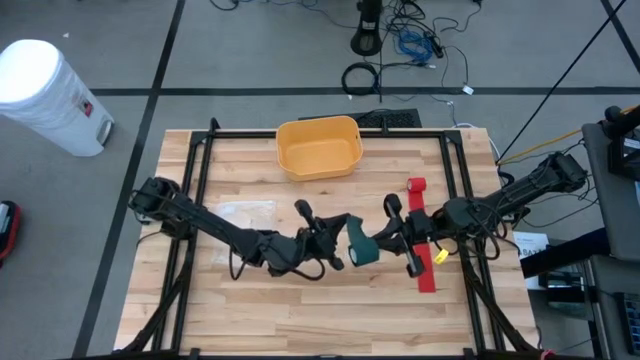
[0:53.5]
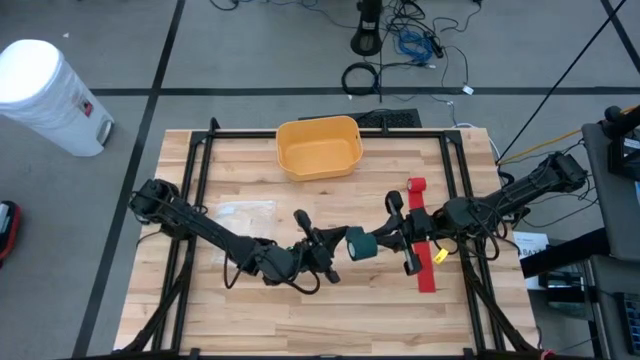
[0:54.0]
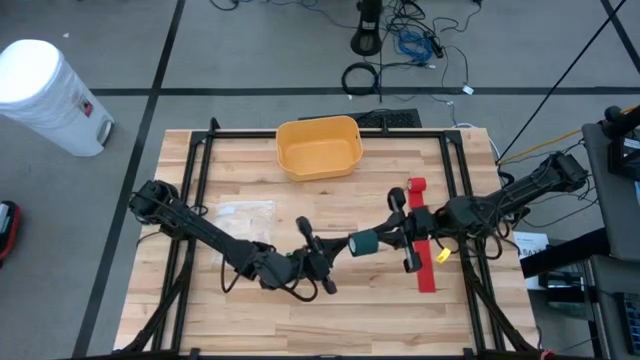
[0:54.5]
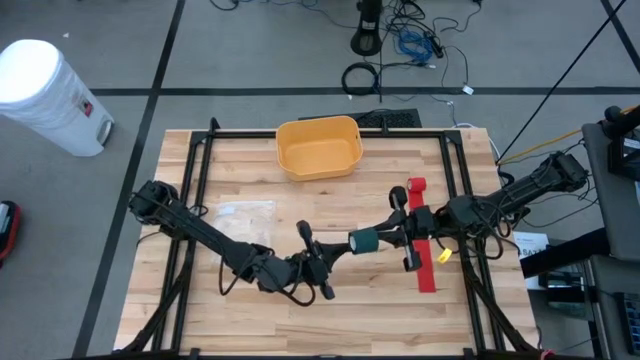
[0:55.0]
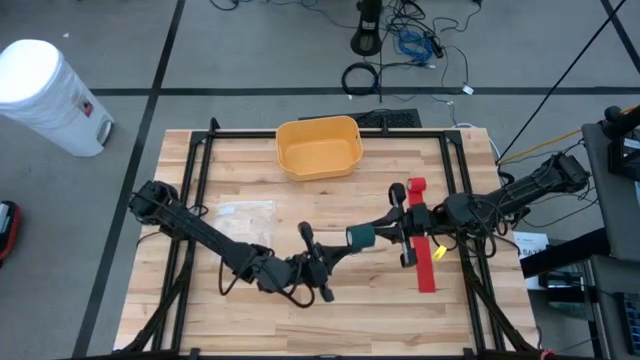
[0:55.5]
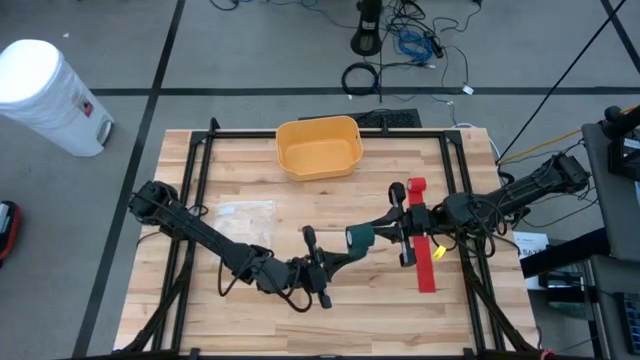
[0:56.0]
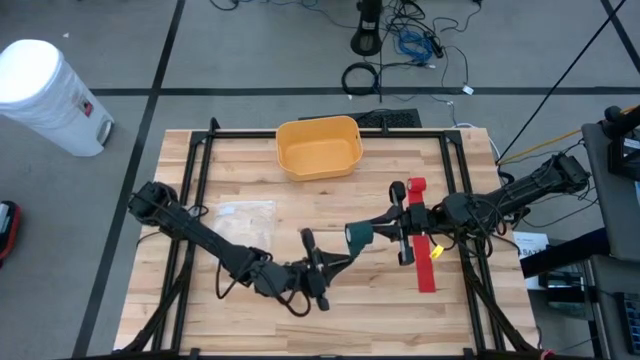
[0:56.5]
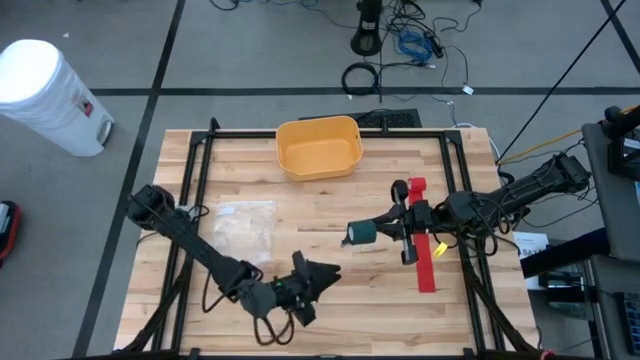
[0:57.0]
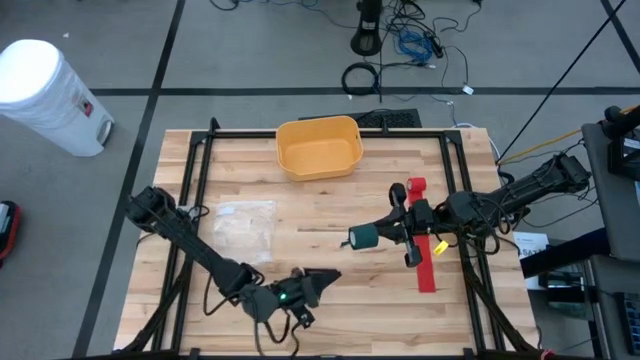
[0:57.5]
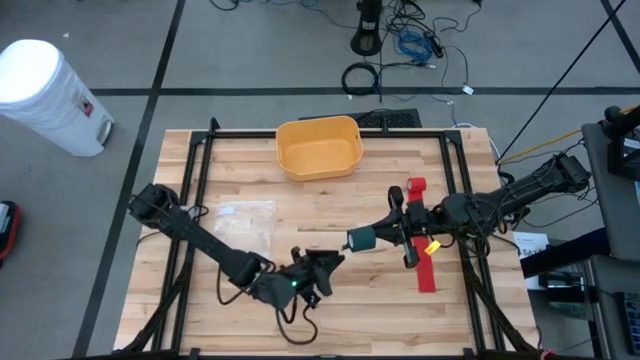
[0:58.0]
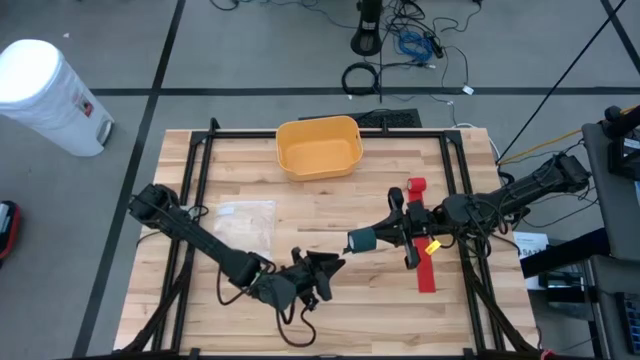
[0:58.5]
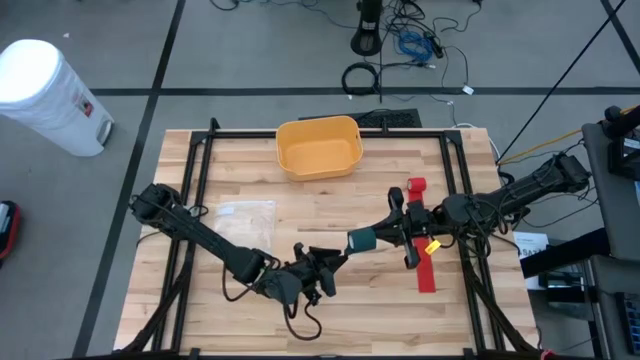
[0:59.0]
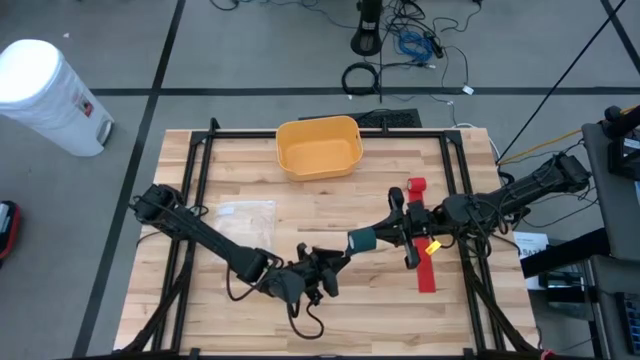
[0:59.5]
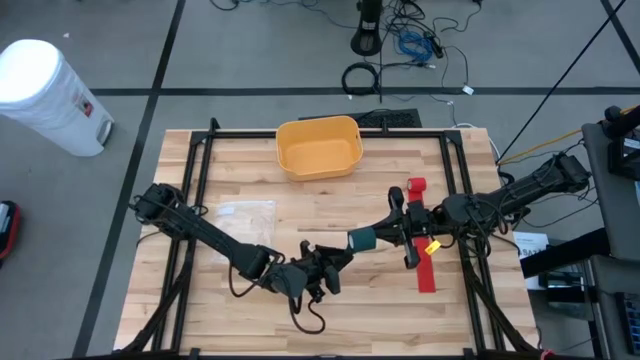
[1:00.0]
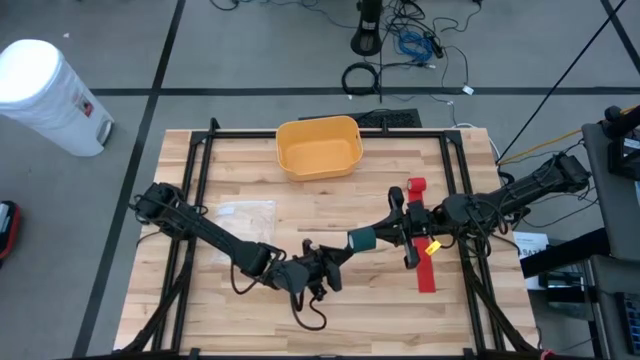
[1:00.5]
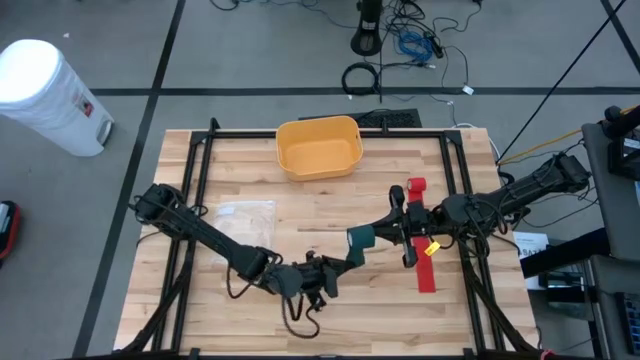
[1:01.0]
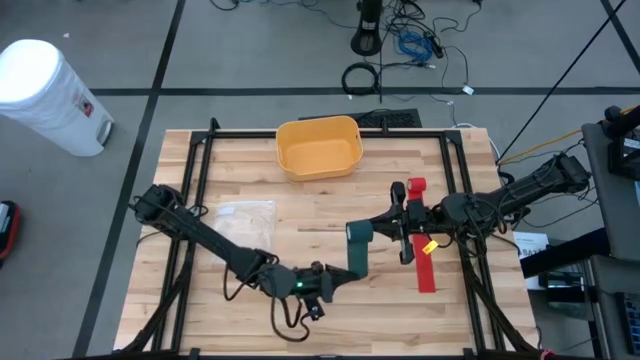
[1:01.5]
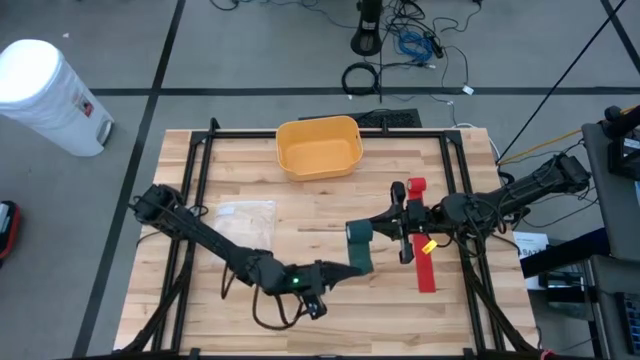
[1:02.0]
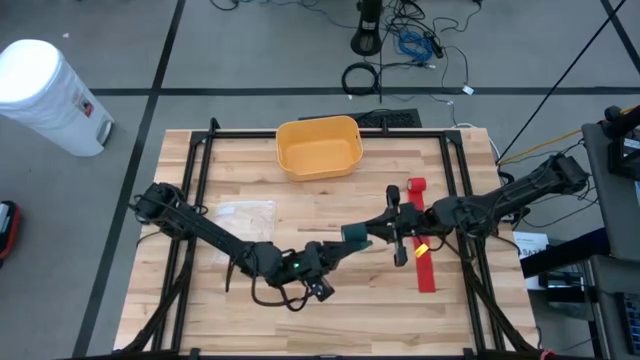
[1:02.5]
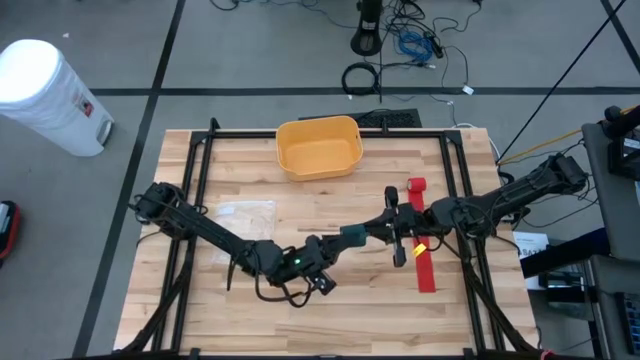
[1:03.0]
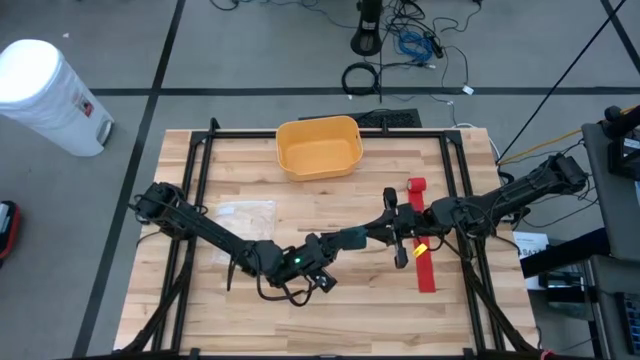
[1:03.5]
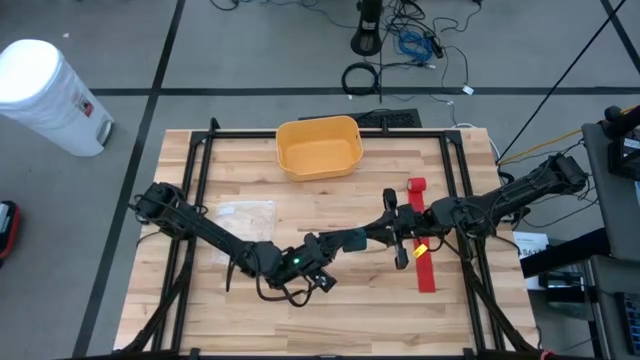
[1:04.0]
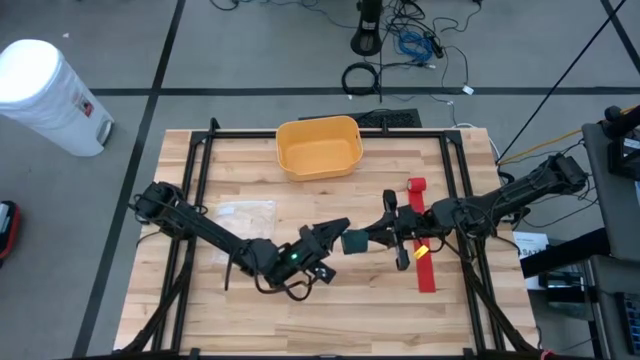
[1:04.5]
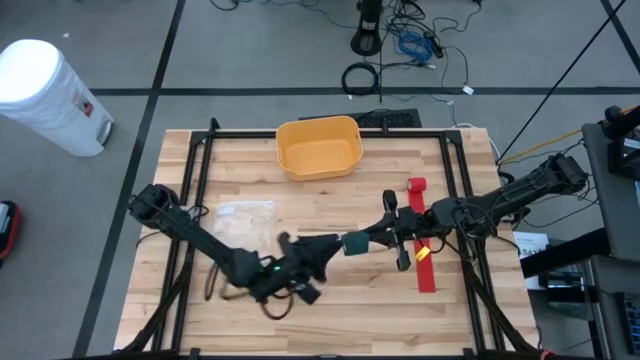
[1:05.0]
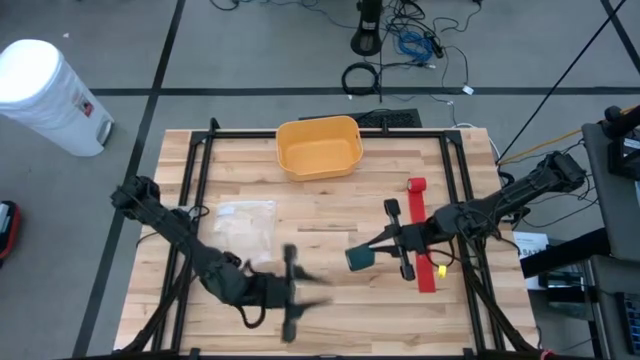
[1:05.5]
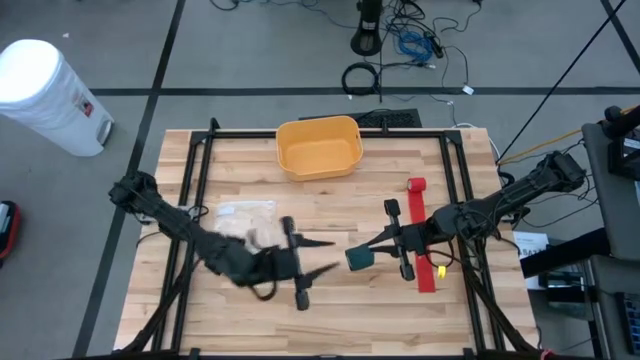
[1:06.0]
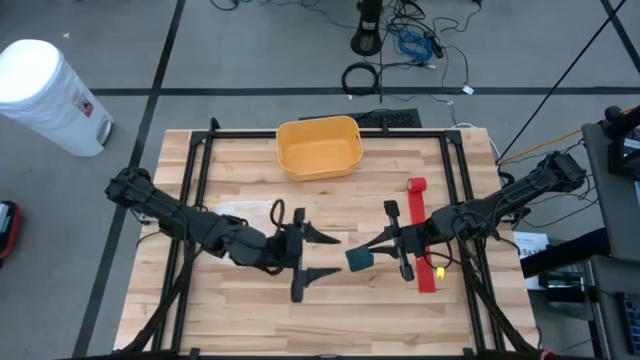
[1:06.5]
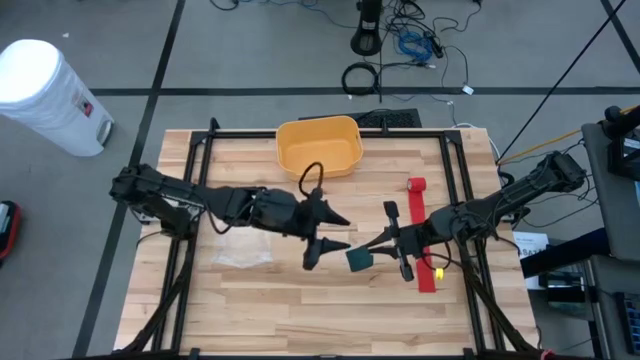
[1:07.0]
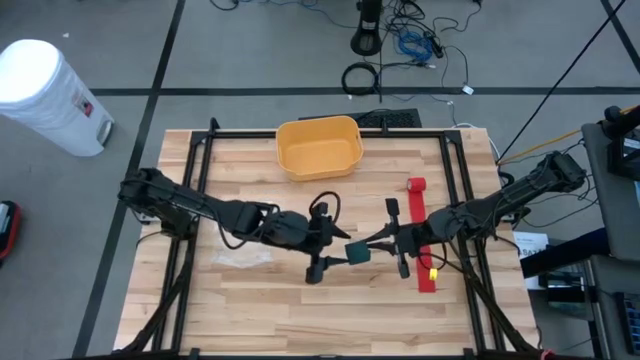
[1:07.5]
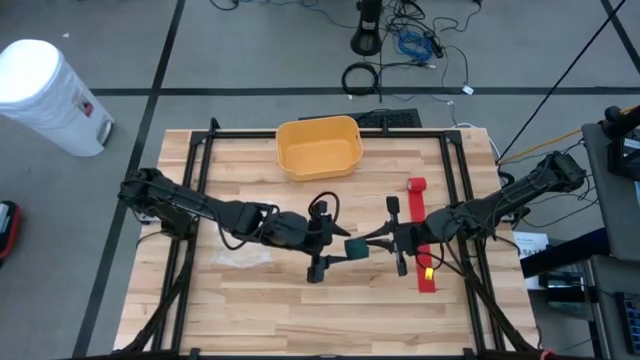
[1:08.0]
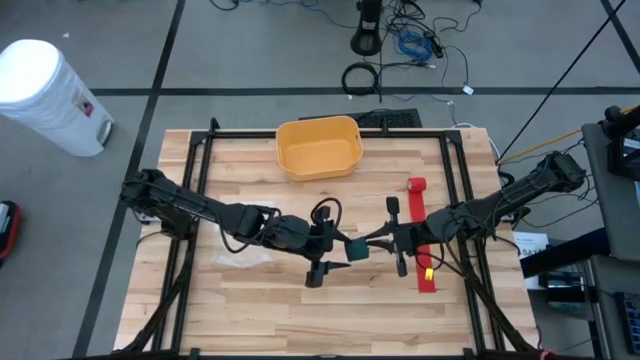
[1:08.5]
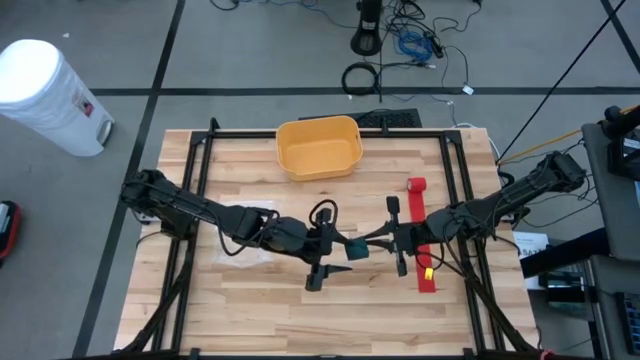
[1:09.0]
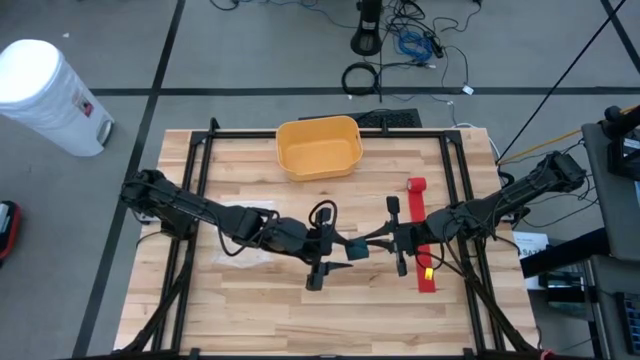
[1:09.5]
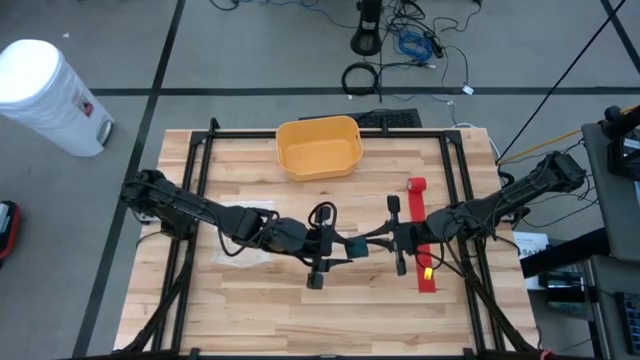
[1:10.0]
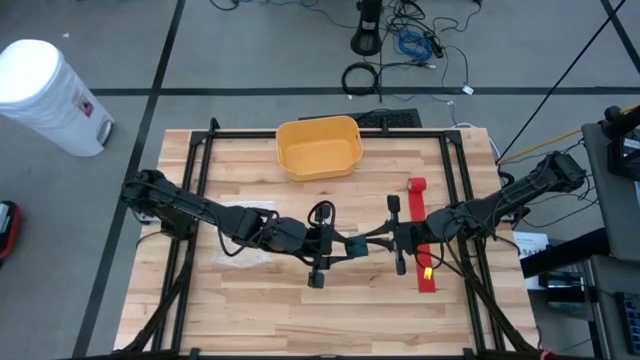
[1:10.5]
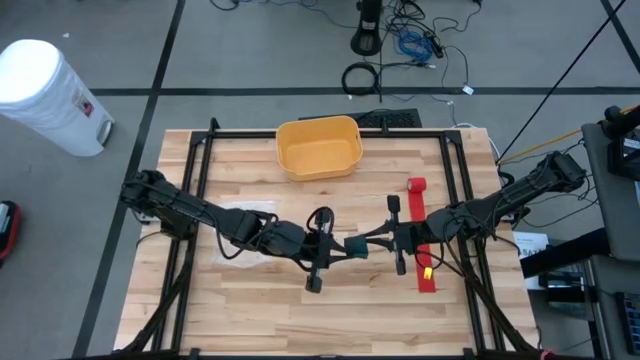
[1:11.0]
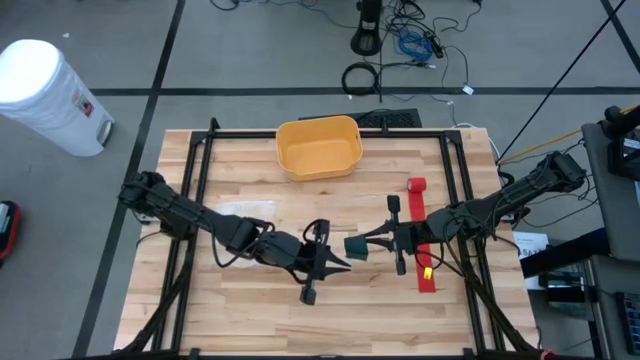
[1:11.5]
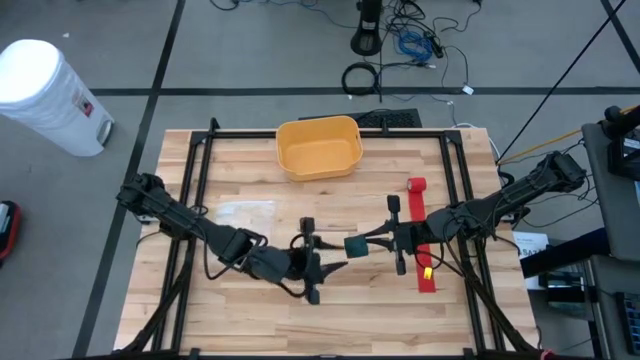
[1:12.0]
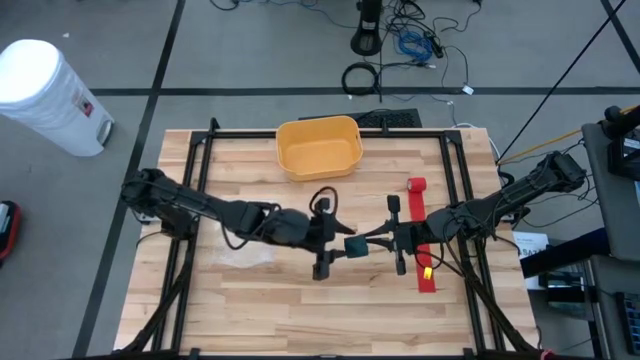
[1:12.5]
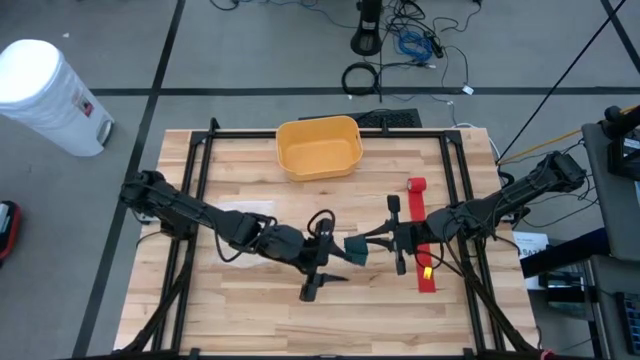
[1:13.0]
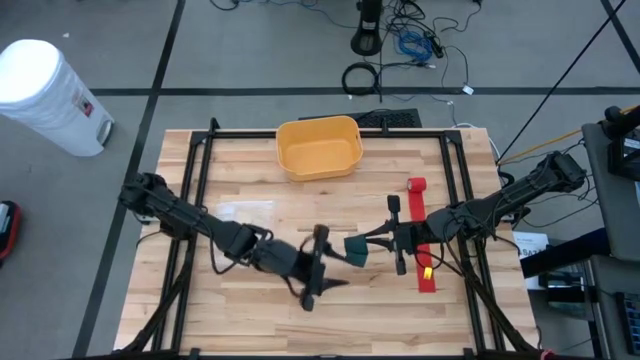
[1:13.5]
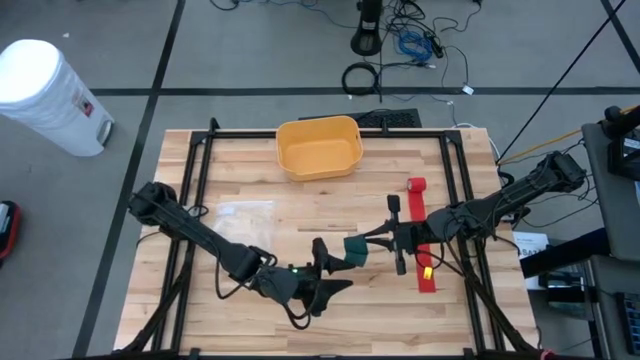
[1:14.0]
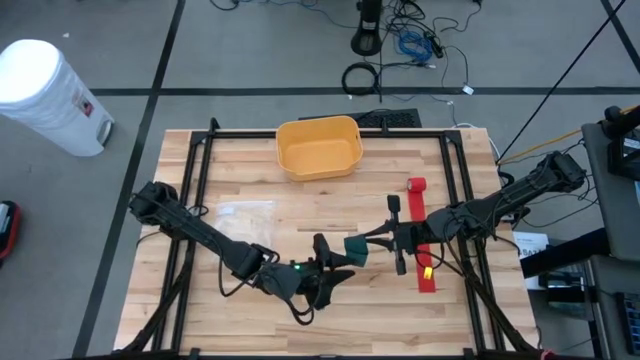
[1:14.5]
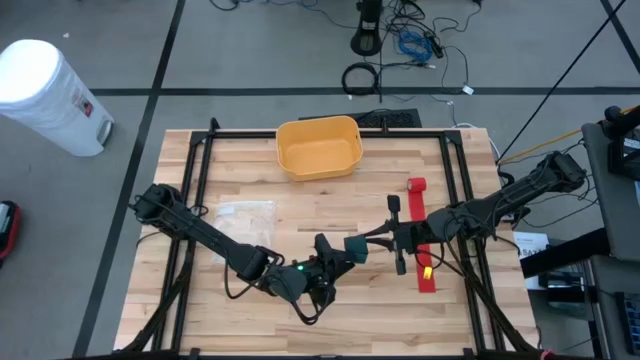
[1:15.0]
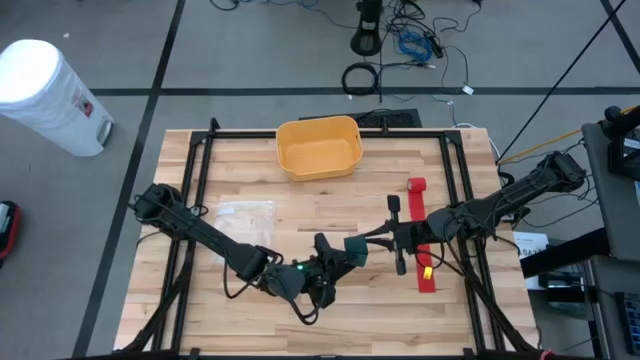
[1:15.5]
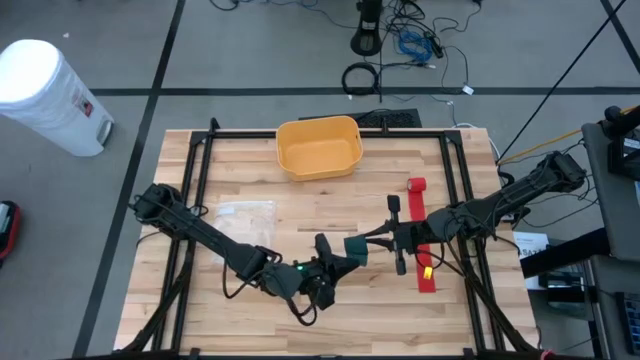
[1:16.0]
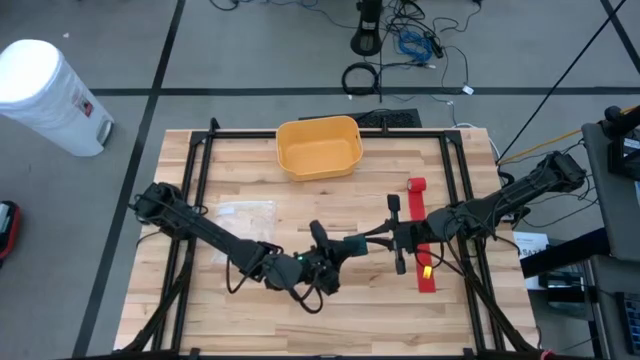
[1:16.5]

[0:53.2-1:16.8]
Task: Roll bandage
Roll the green bandage
